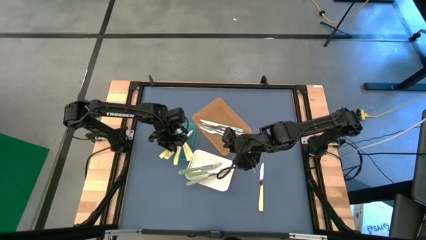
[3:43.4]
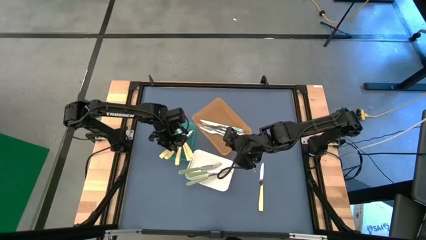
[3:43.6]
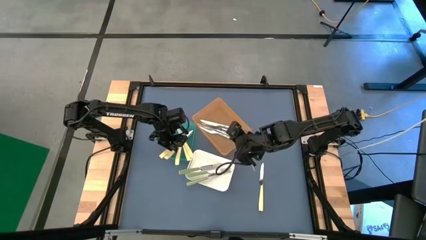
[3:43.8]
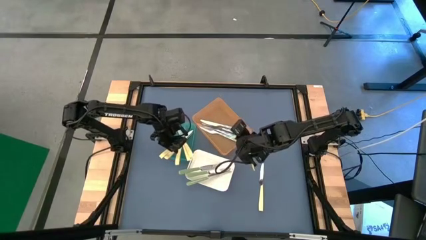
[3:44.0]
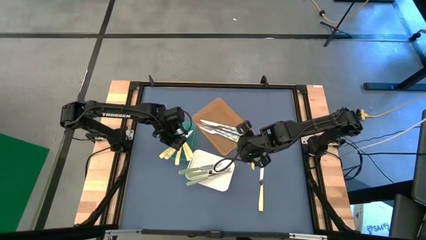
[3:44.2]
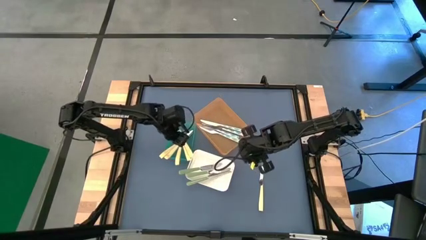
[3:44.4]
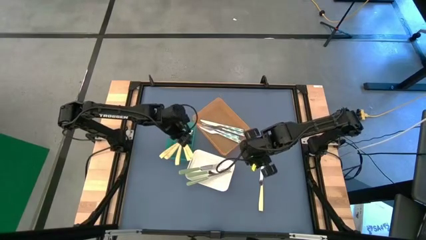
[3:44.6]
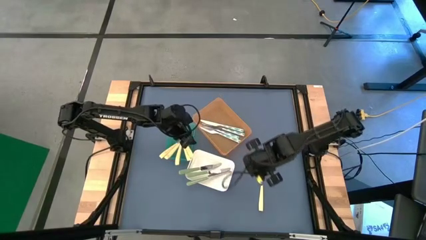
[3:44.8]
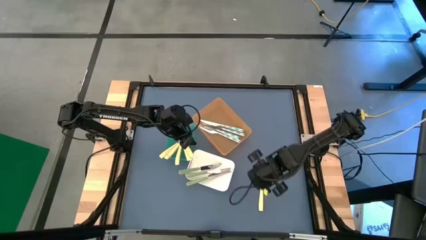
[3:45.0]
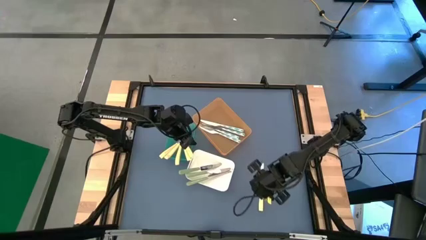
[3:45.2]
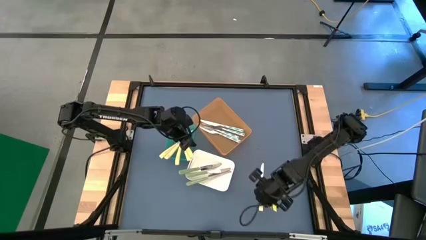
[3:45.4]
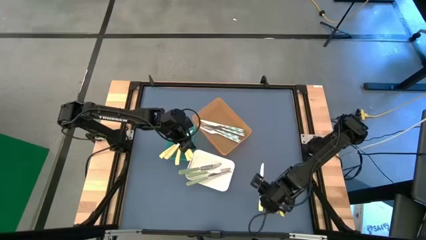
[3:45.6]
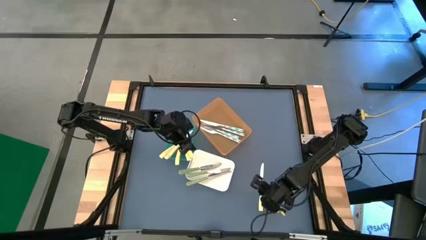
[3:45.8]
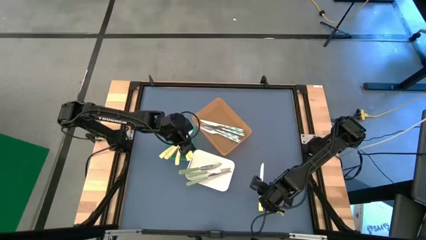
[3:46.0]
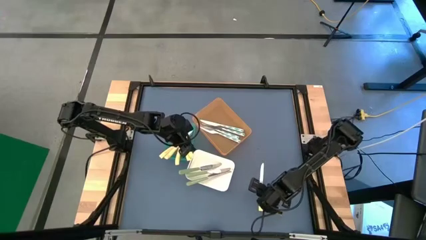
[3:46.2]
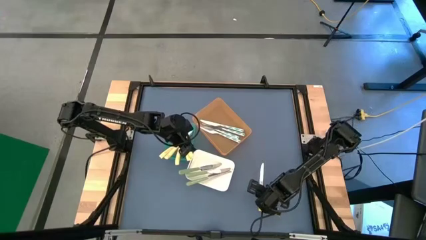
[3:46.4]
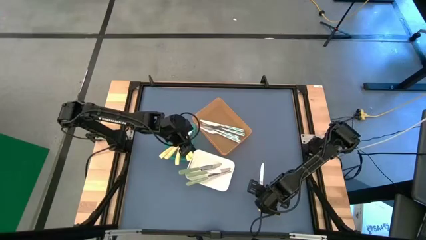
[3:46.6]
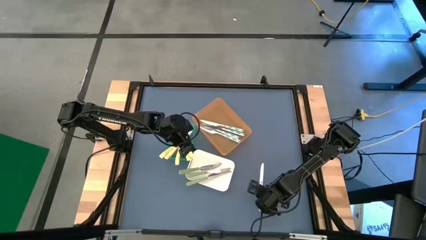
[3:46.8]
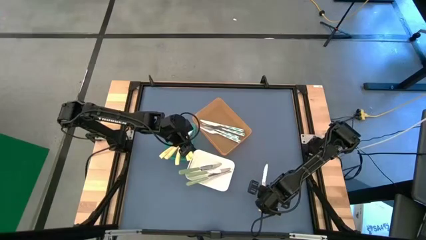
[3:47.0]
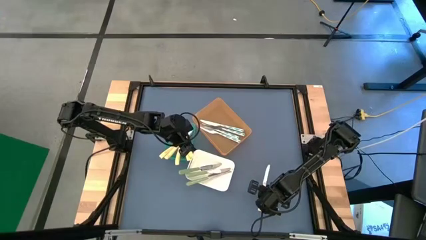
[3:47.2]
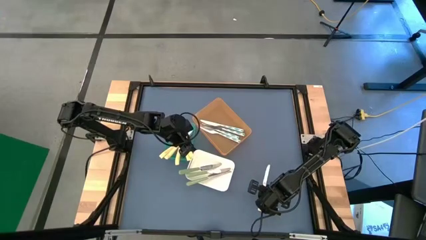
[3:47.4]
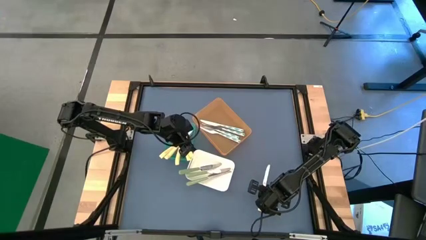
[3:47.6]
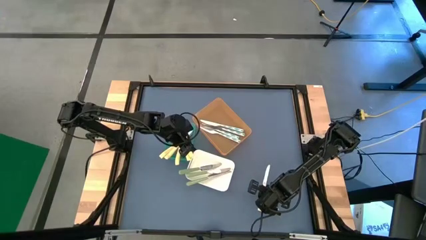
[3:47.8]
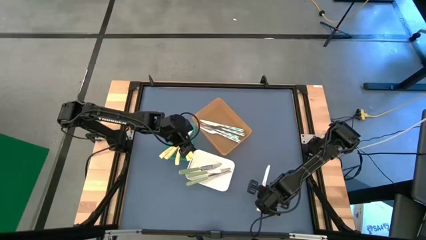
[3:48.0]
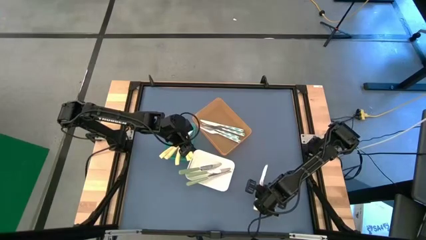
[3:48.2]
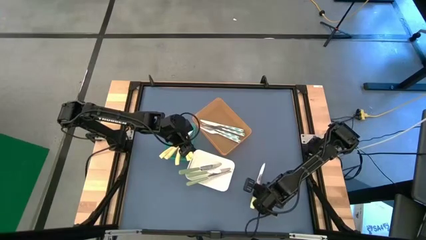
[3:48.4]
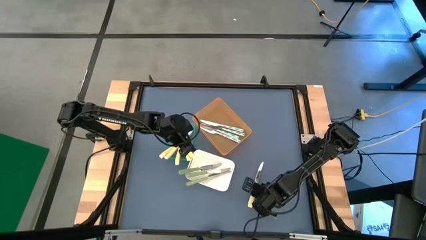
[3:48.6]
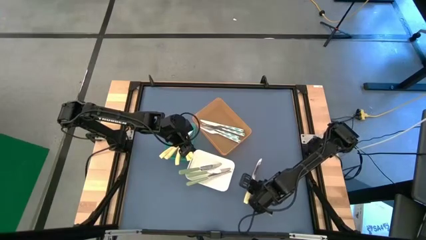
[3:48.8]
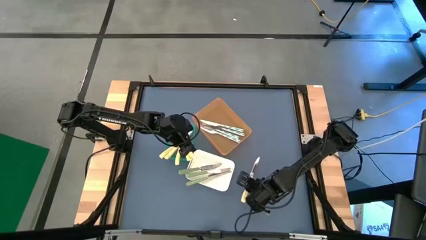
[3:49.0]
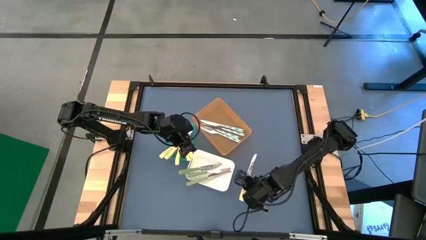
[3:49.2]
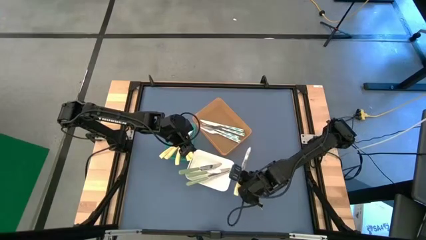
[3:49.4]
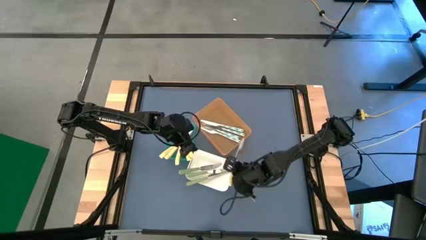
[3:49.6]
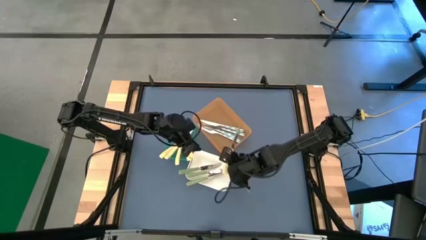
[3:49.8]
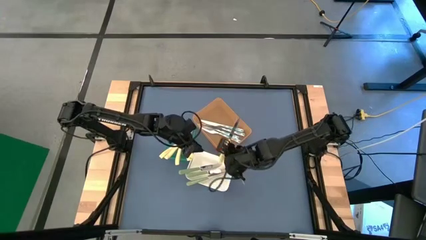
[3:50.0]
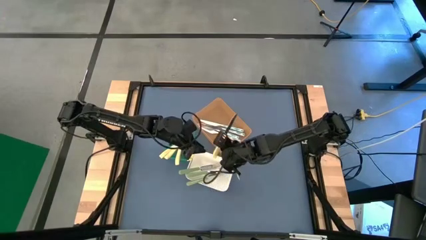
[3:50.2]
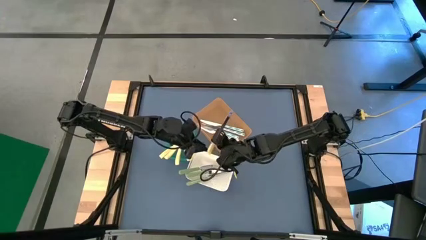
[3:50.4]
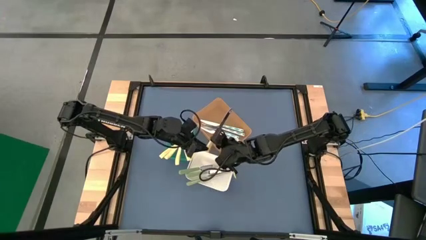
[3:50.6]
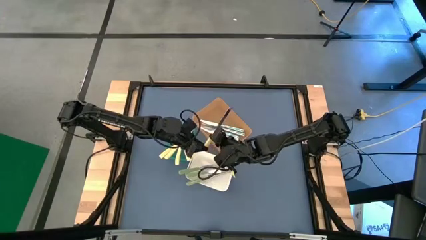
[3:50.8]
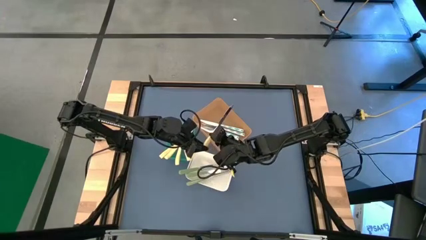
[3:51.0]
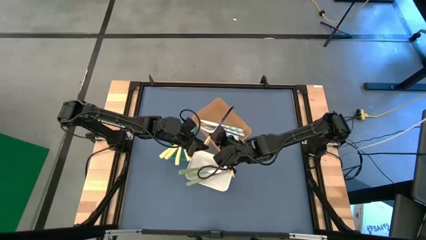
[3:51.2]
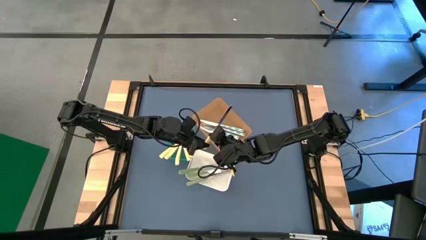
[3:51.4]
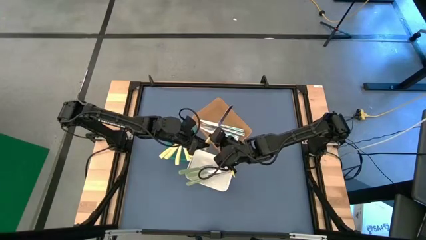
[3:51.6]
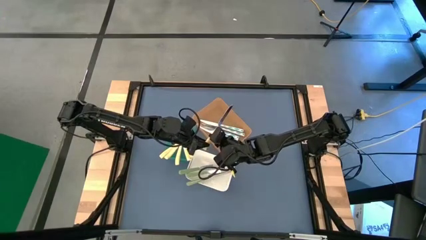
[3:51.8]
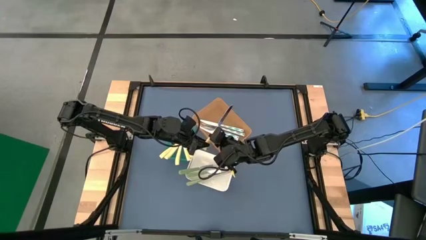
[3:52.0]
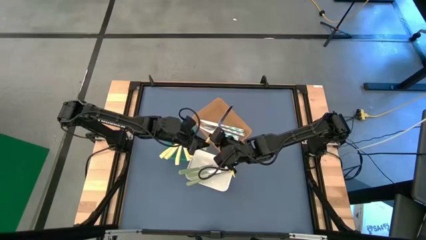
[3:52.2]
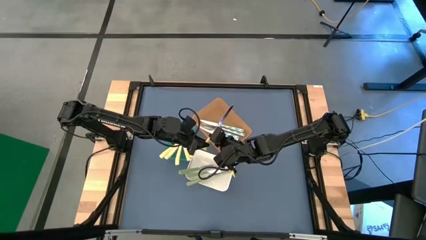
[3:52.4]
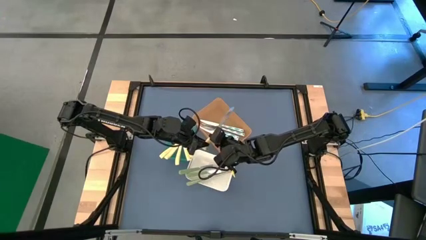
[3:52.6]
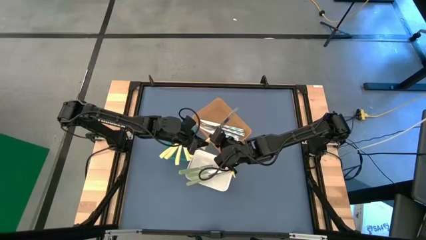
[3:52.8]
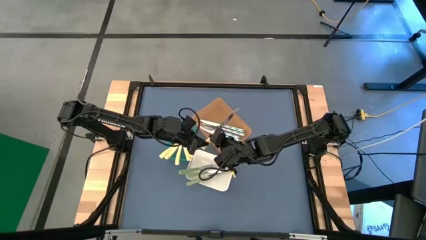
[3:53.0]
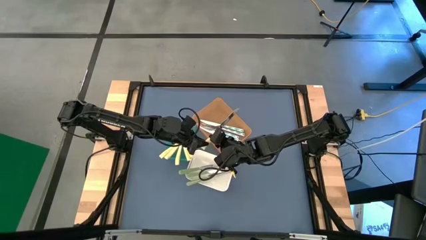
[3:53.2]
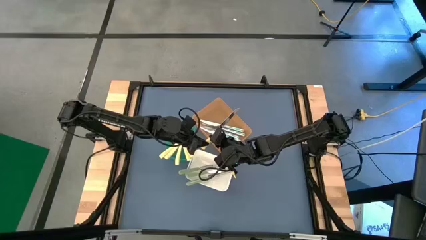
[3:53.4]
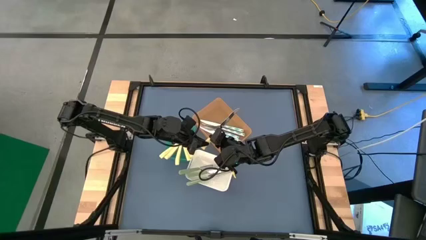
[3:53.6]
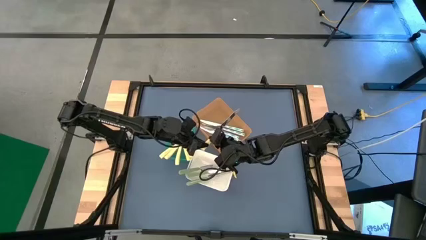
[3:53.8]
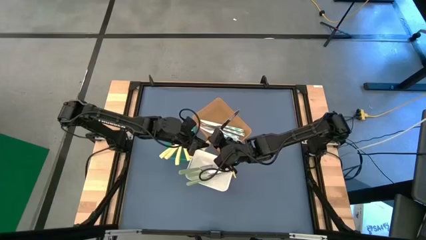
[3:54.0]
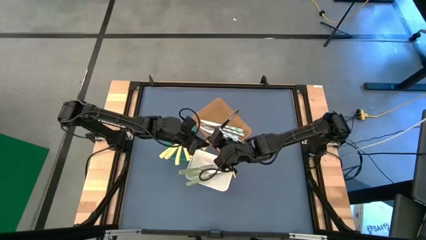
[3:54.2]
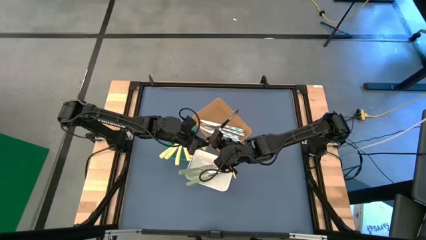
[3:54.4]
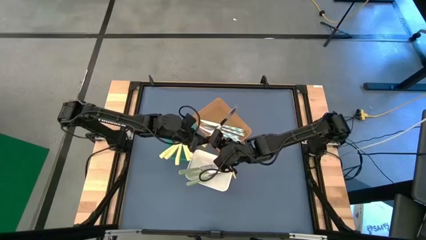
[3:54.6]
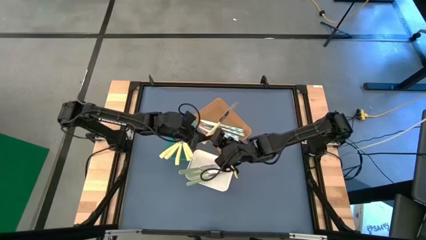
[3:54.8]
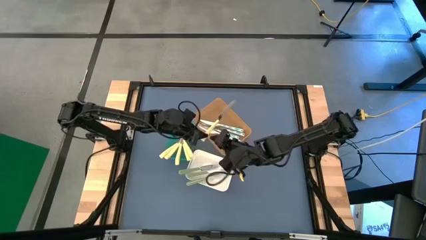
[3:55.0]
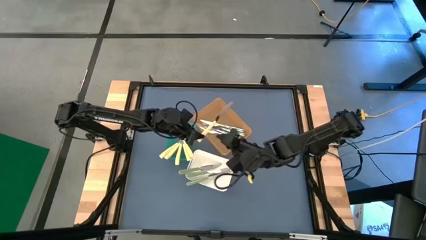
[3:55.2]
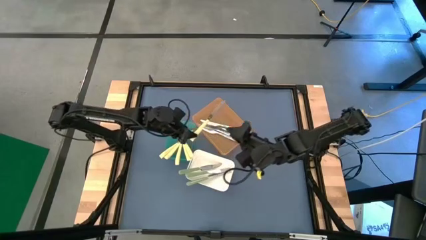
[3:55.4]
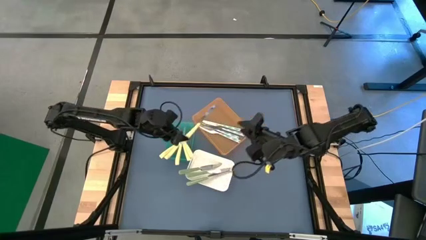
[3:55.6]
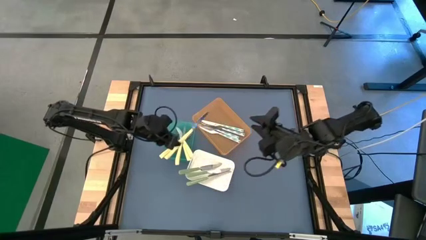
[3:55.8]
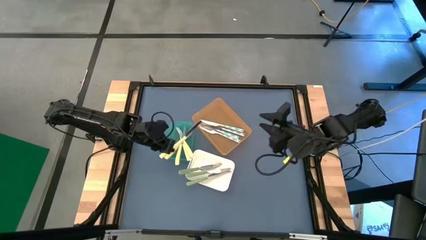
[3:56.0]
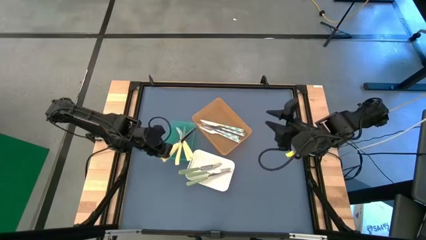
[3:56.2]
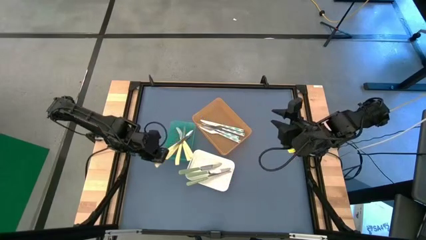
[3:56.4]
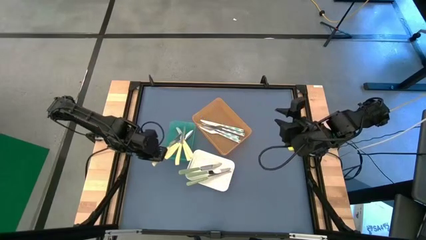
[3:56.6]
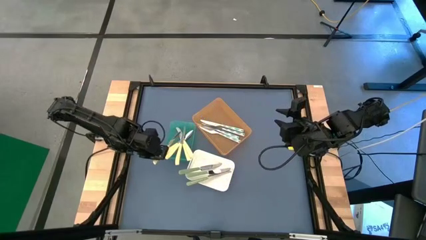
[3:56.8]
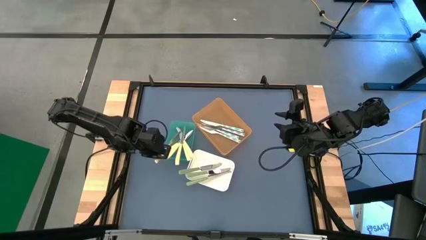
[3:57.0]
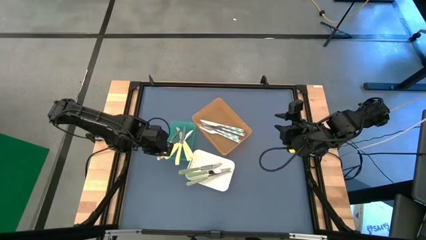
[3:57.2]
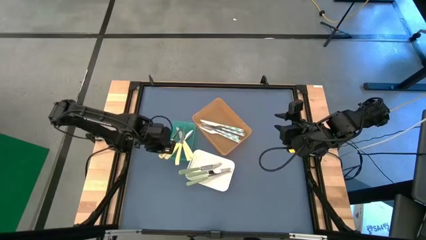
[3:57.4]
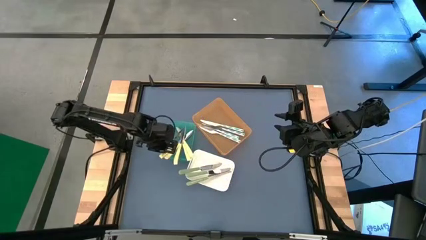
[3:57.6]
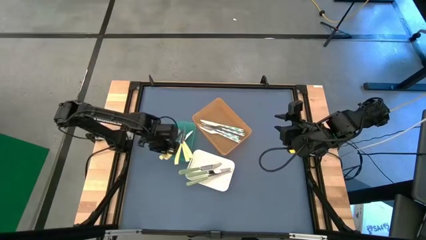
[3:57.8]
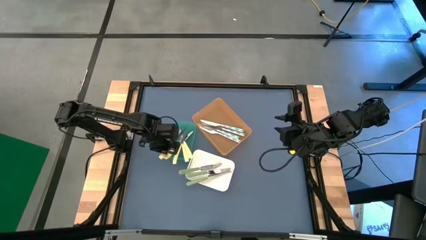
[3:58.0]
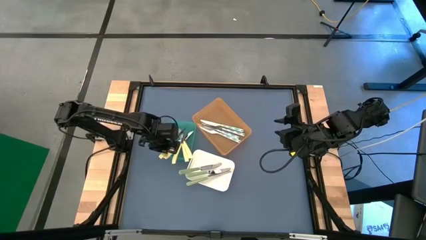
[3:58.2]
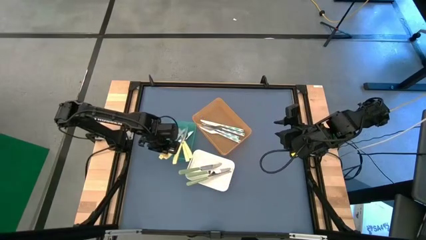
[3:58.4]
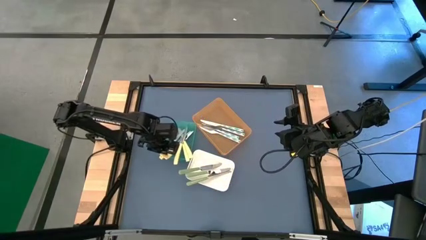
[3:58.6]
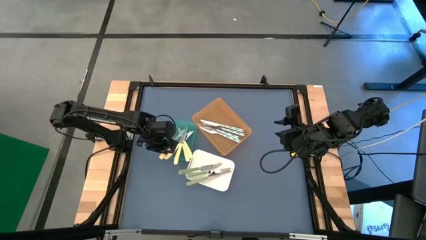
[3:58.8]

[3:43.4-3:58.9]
Task: Sort silverware by color (type)
Put the yellow table knife into the green bin

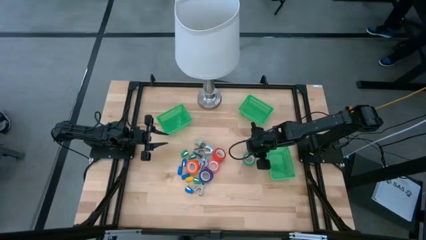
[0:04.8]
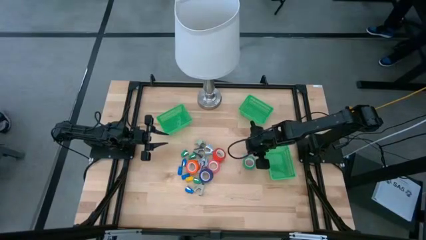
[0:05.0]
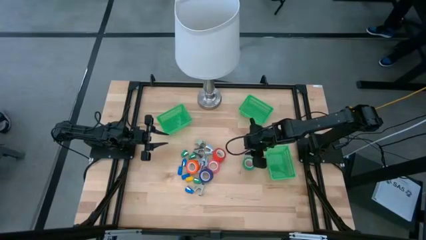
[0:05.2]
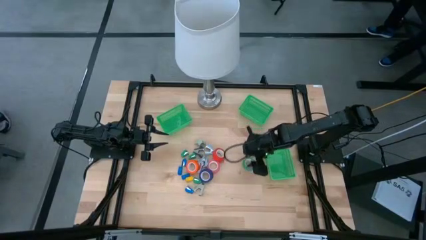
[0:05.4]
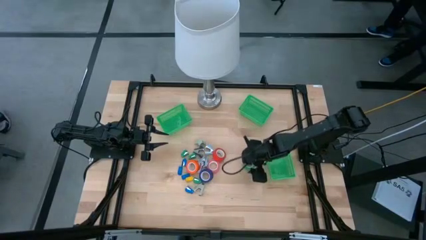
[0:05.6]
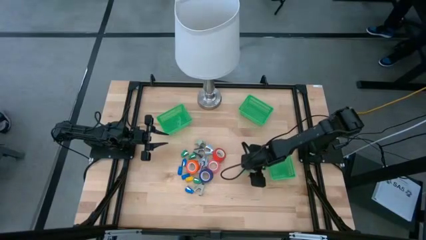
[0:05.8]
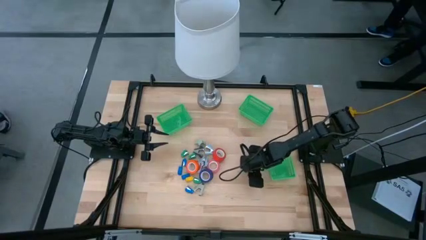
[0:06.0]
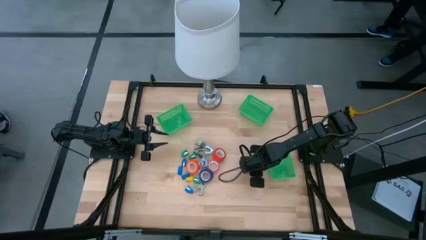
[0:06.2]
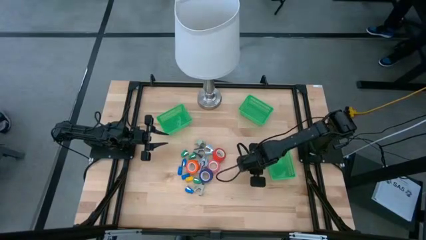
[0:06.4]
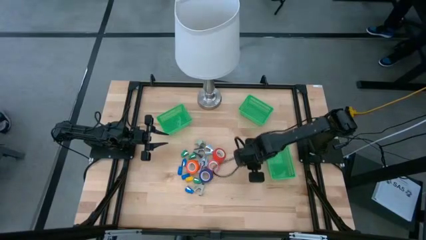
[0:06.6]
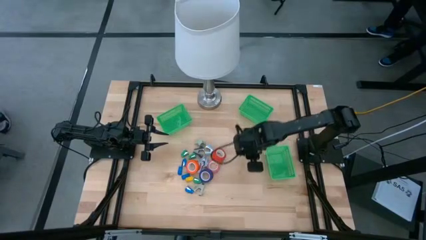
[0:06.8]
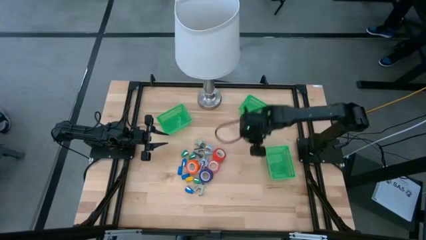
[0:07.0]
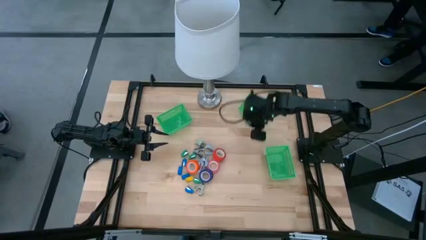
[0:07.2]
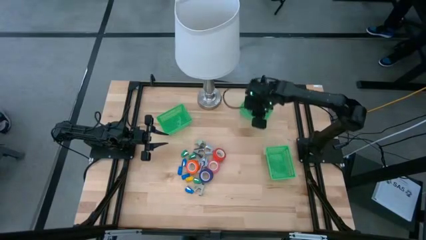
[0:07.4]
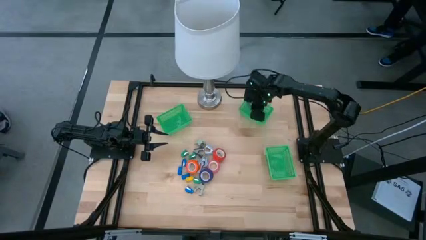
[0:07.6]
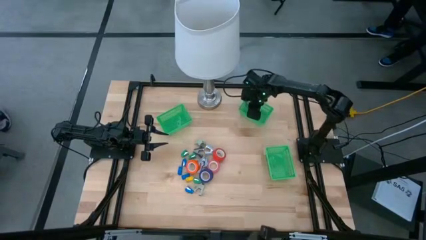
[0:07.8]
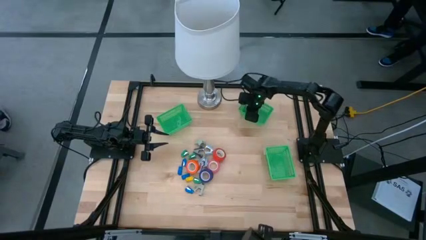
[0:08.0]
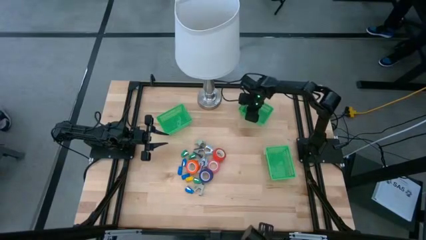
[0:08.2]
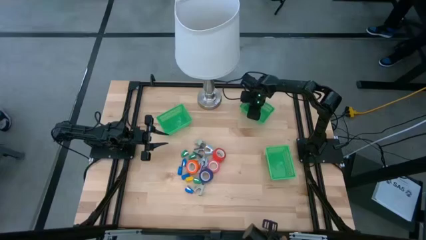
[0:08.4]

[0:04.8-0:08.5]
Task: Pick and place Stapler, Stapler remover, tape
Put the green tape into the top right green bin
